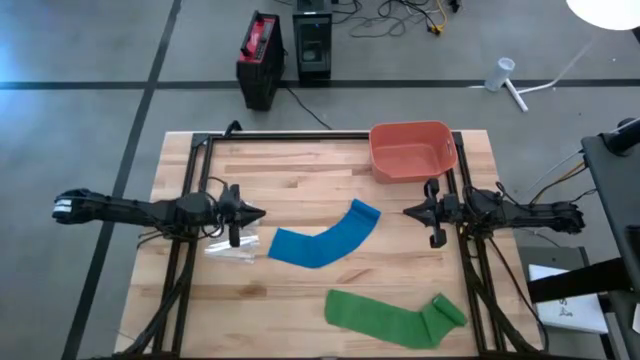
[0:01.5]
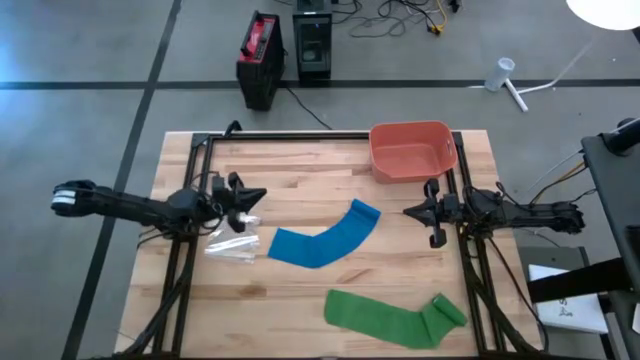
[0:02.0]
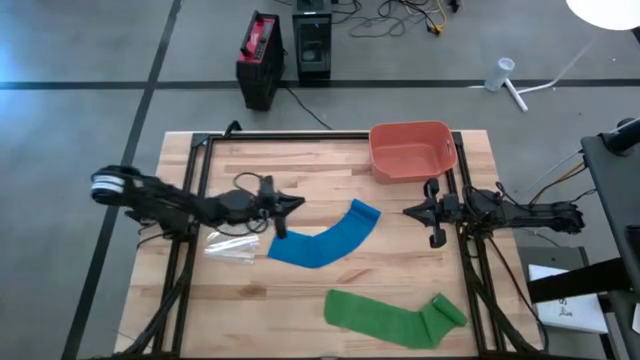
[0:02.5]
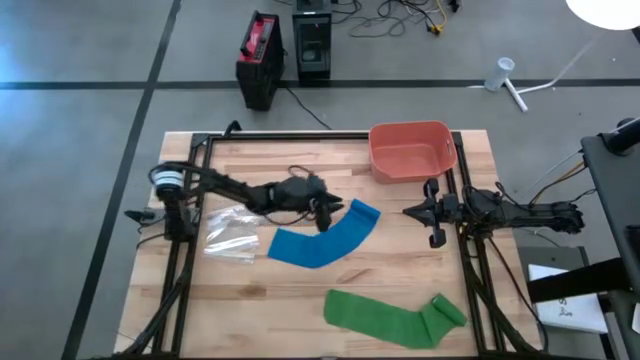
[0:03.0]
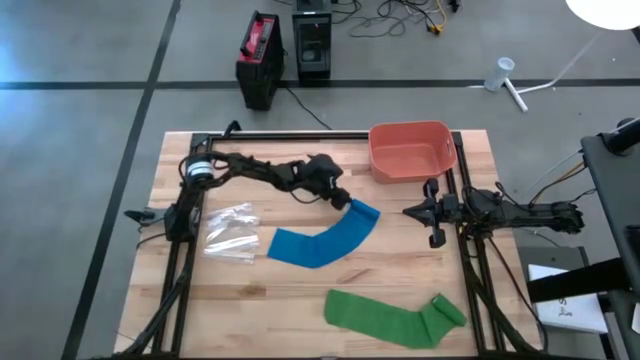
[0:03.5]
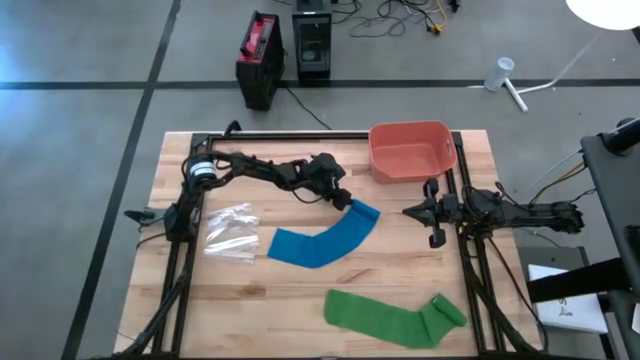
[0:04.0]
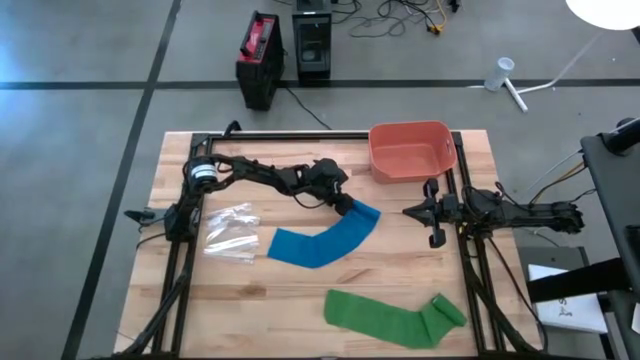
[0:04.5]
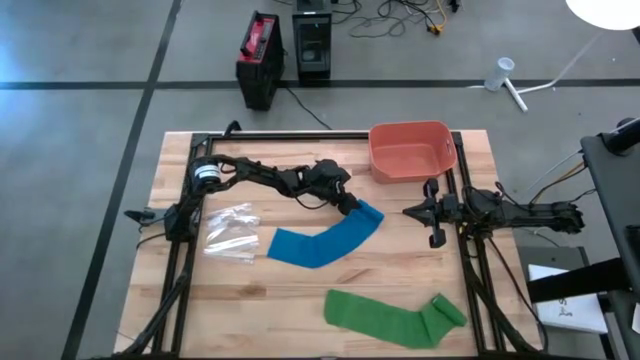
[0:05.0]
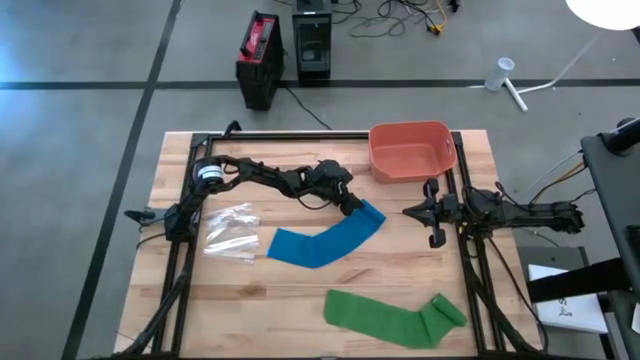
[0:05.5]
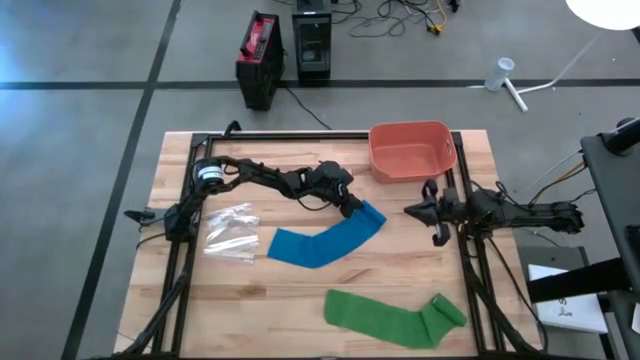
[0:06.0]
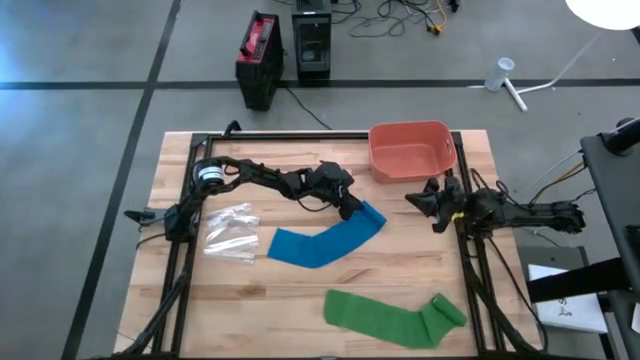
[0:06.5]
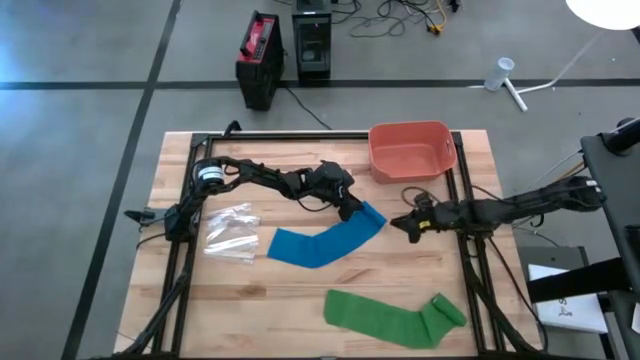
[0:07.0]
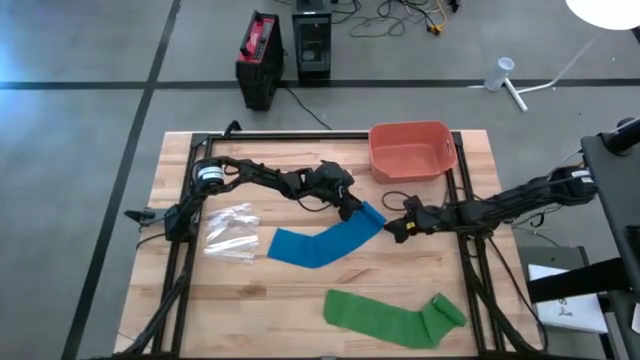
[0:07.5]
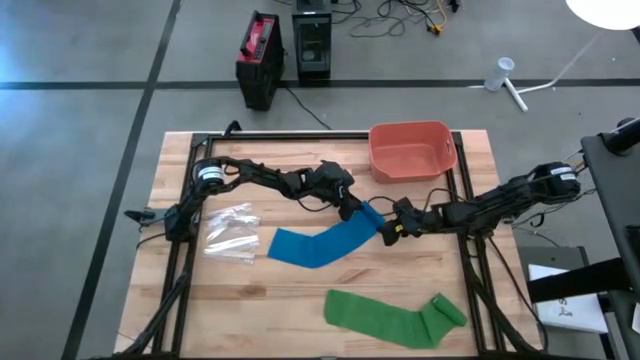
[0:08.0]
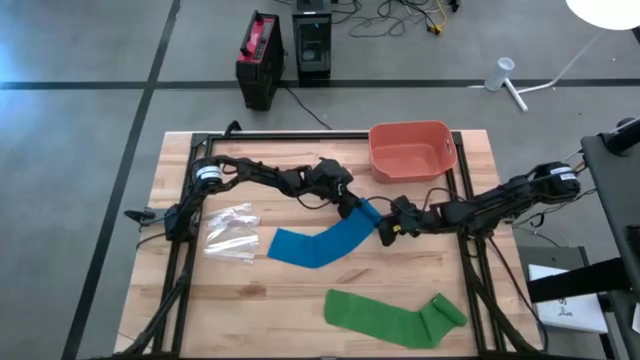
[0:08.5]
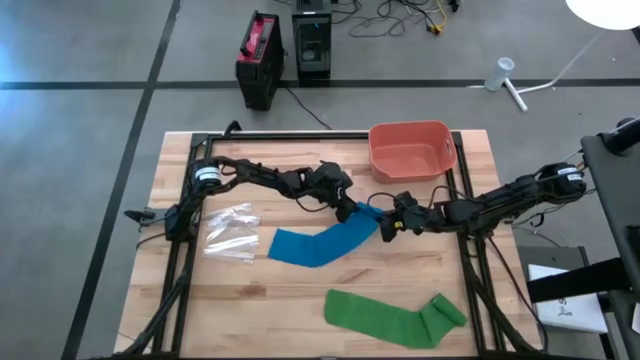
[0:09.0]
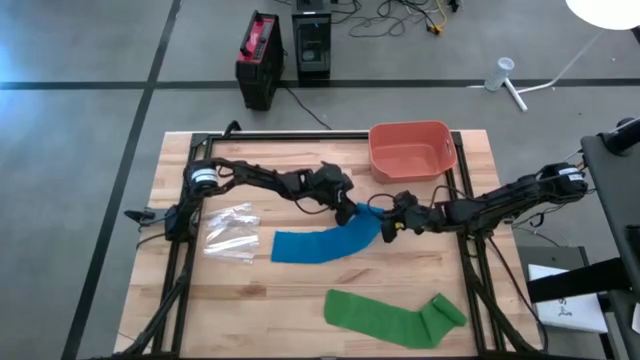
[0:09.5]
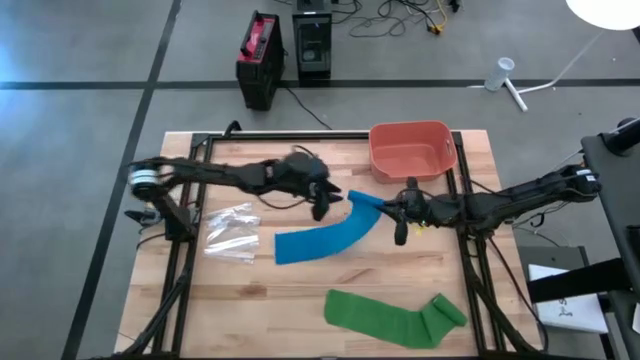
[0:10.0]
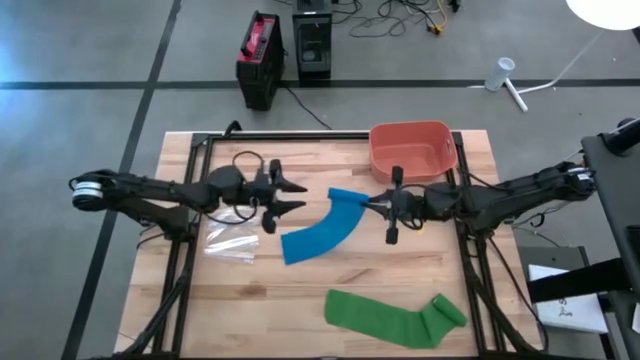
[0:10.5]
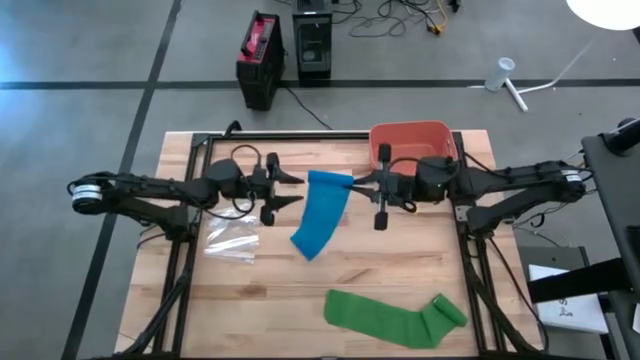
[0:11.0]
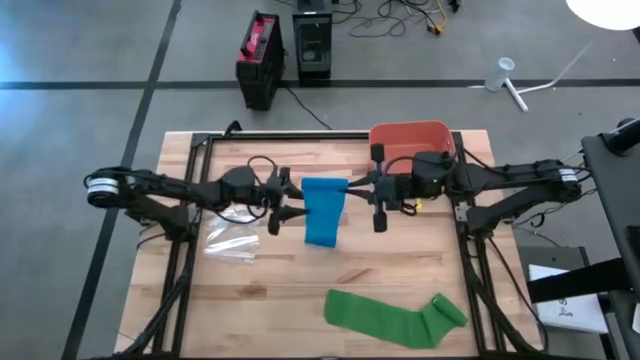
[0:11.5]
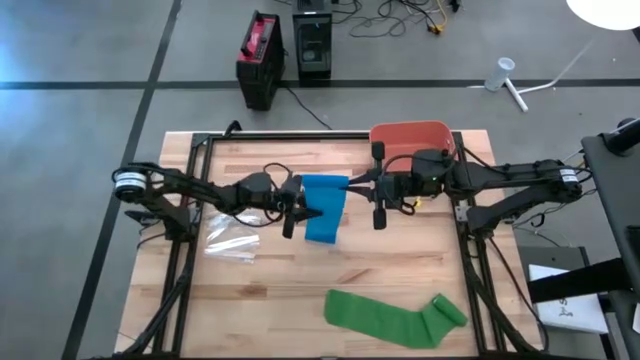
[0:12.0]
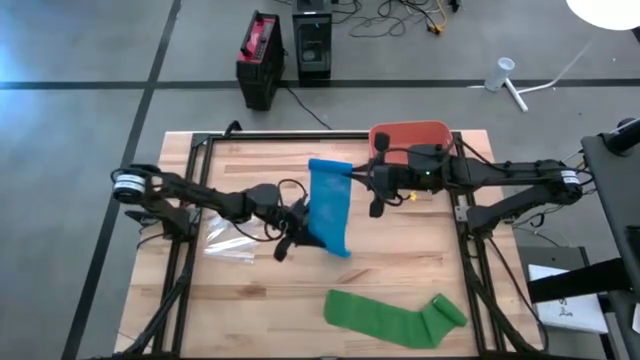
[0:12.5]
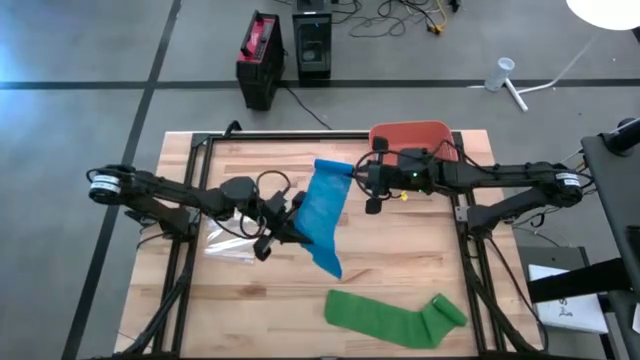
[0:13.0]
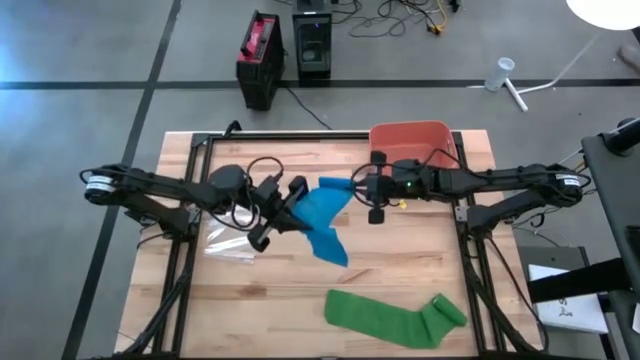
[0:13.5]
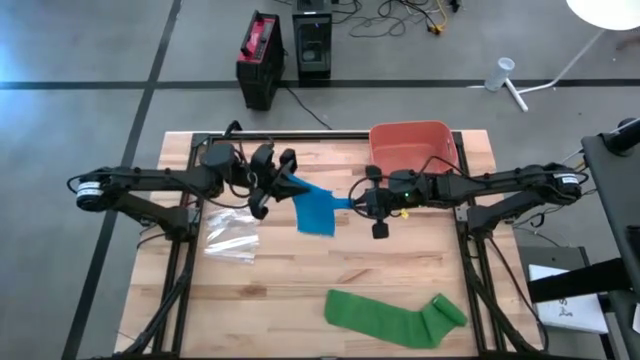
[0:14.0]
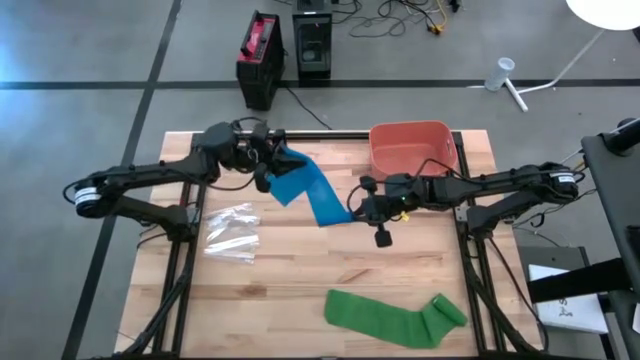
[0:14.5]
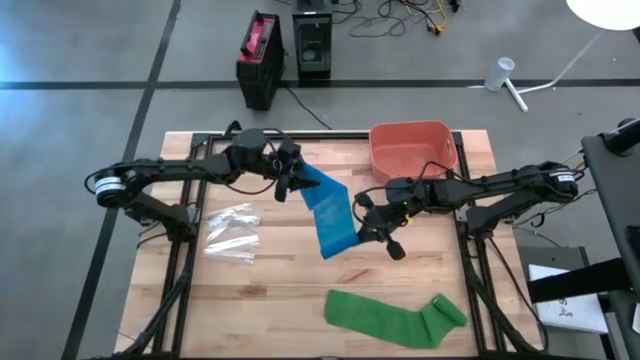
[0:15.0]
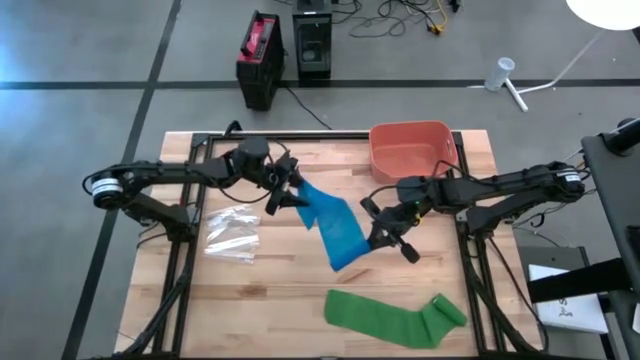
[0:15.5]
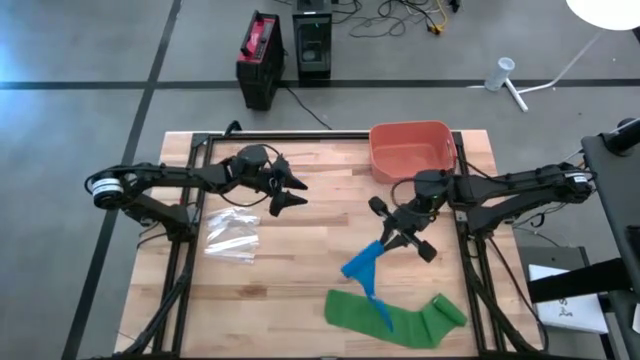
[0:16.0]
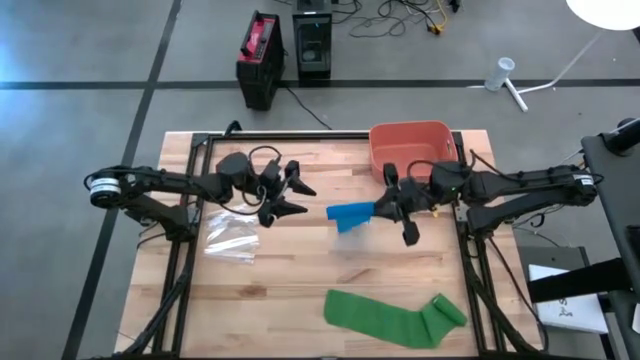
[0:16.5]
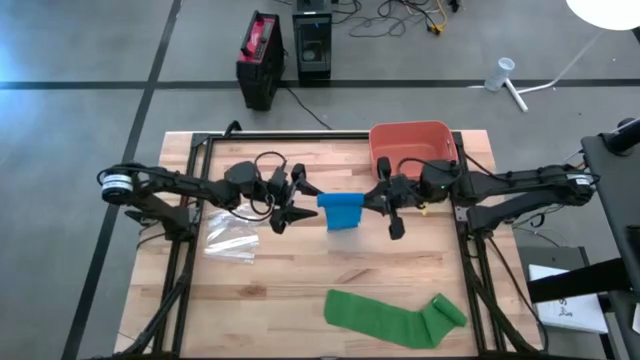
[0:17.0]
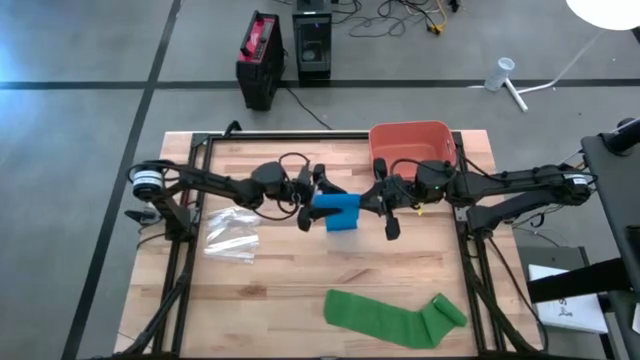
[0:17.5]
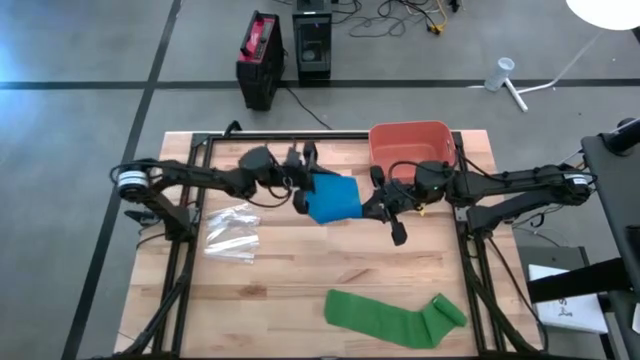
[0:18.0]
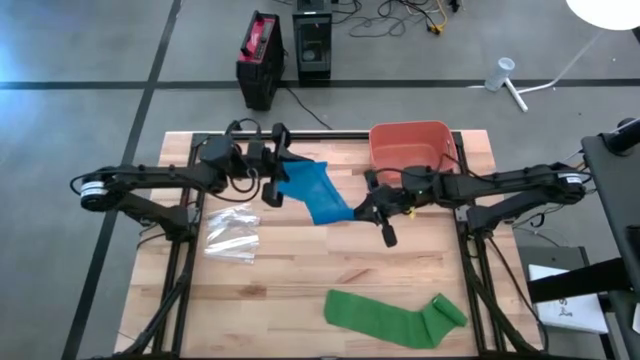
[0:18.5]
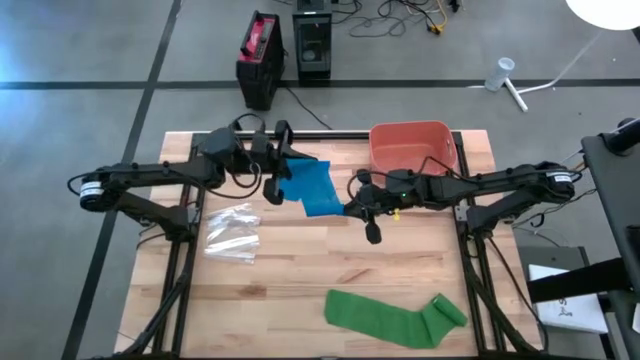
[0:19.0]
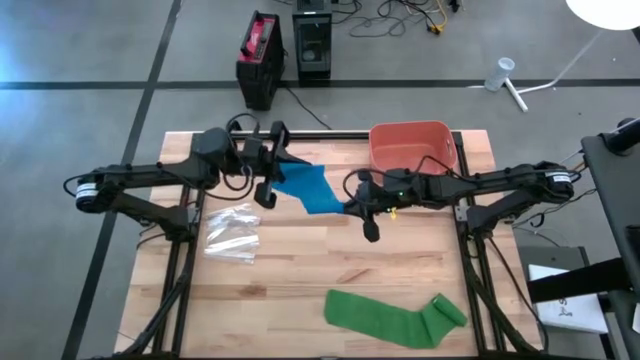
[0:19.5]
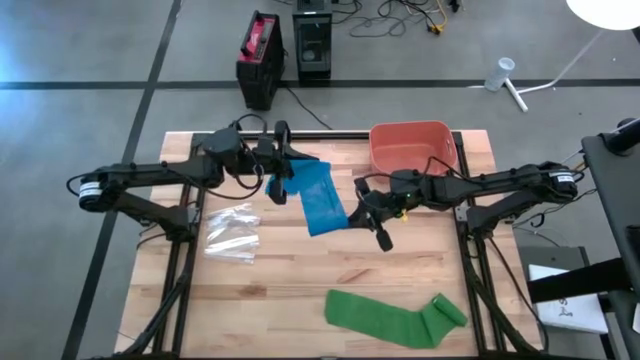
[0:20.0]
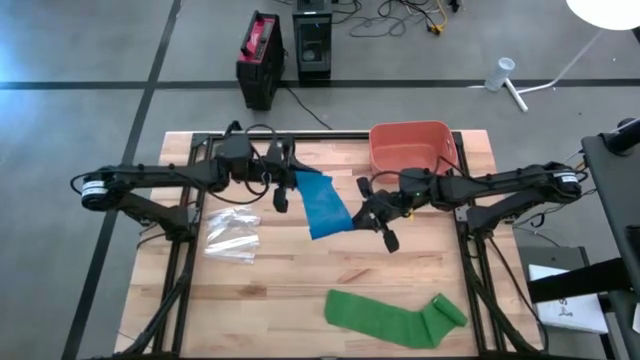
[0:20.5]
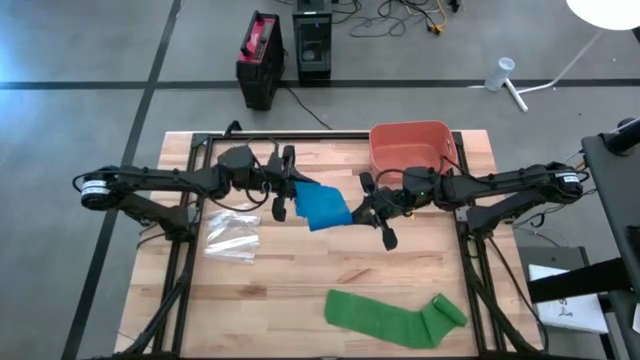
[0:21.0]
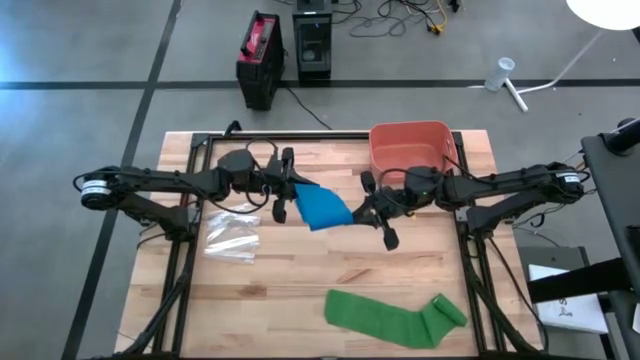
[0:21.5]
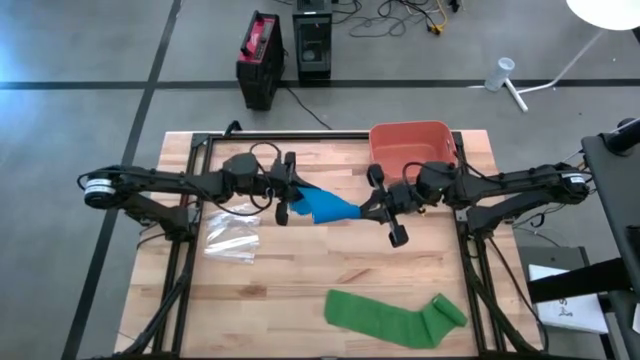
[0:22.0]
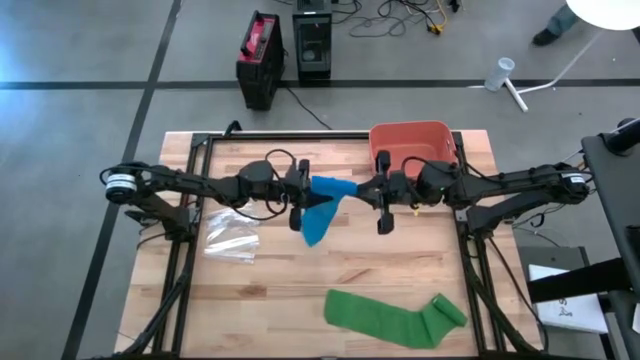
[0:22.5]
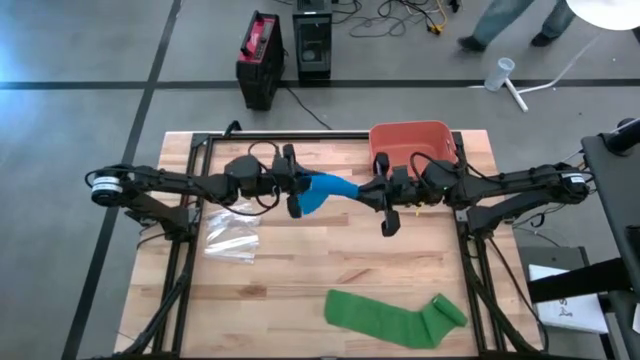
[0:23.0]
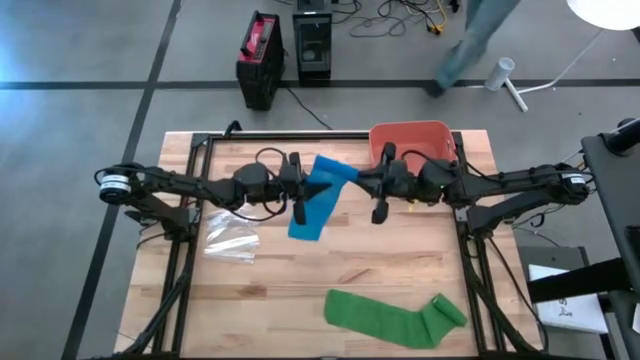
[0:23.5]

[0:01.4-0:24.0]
Task: Roll bandage
Roll the blue bandage
